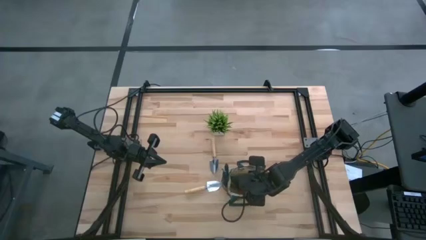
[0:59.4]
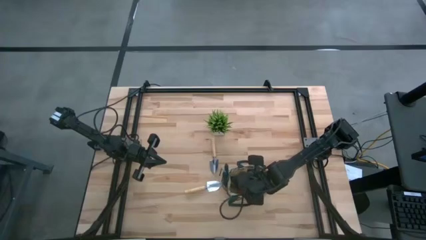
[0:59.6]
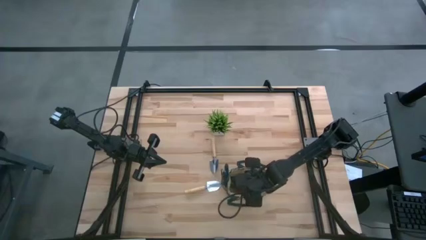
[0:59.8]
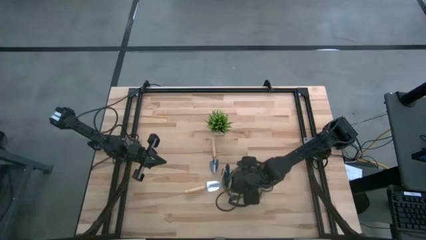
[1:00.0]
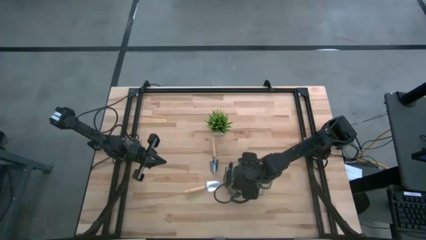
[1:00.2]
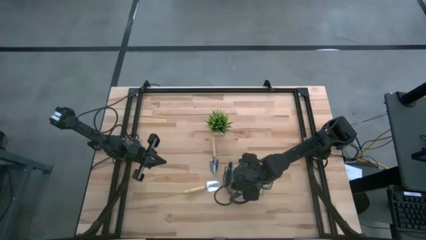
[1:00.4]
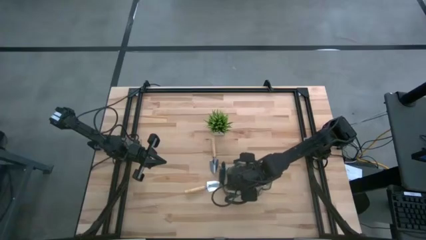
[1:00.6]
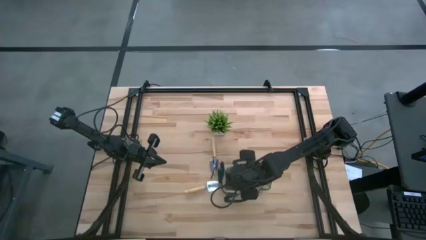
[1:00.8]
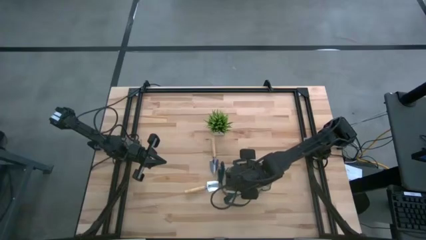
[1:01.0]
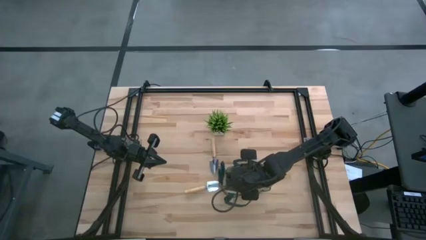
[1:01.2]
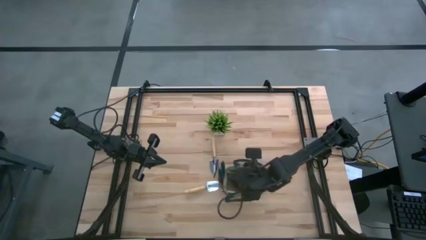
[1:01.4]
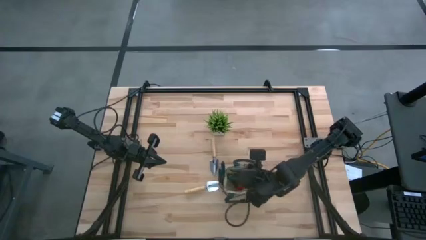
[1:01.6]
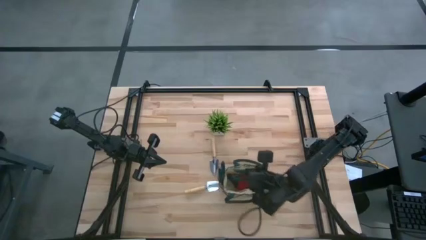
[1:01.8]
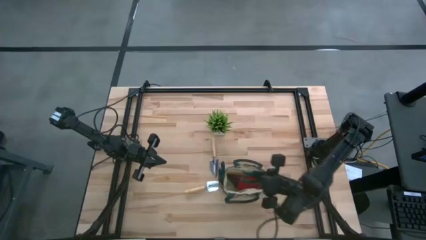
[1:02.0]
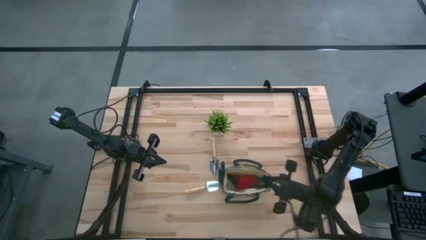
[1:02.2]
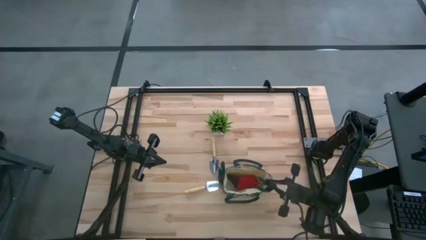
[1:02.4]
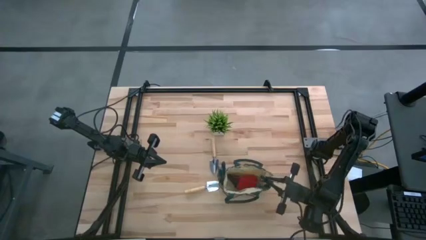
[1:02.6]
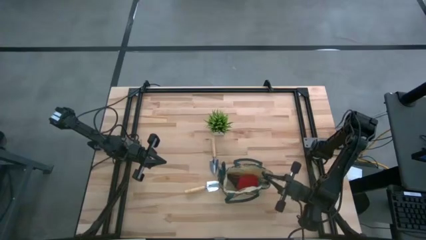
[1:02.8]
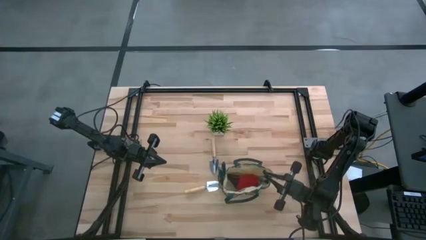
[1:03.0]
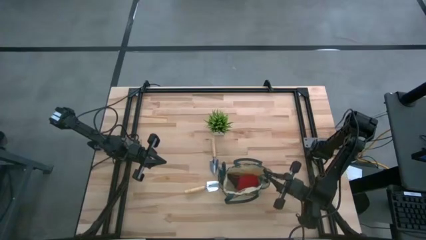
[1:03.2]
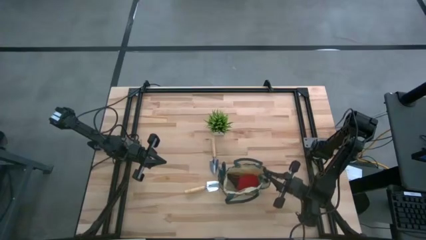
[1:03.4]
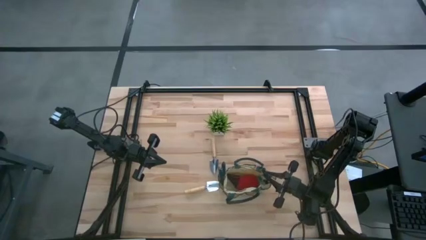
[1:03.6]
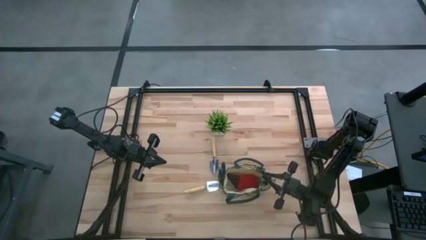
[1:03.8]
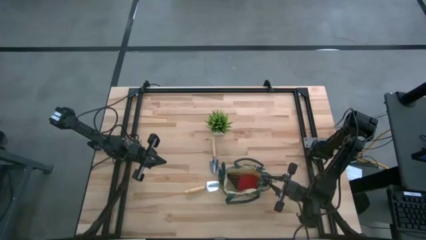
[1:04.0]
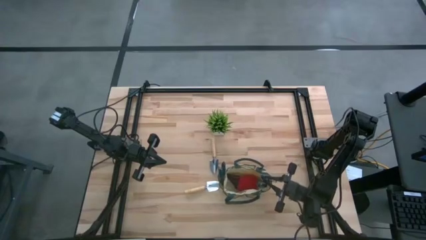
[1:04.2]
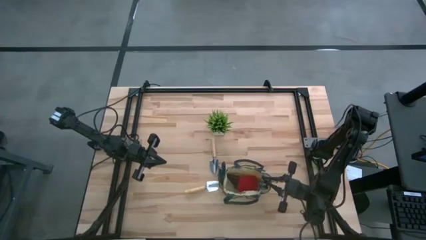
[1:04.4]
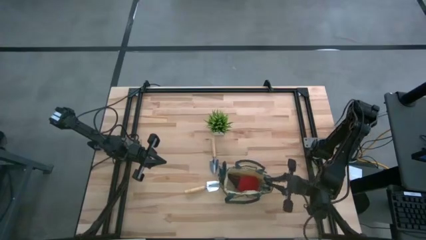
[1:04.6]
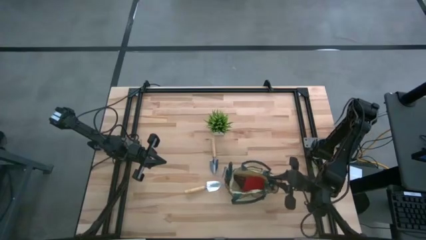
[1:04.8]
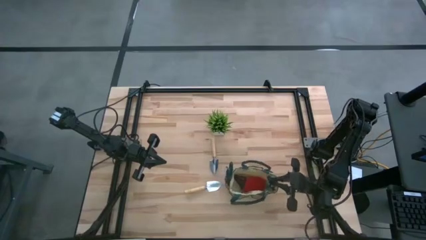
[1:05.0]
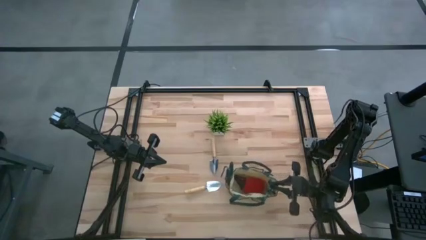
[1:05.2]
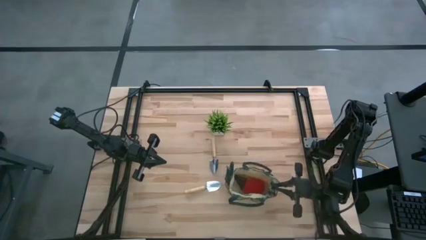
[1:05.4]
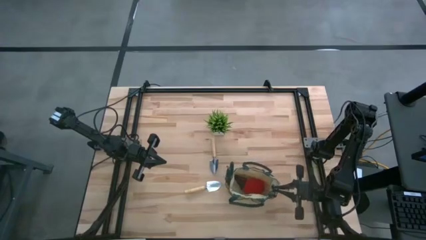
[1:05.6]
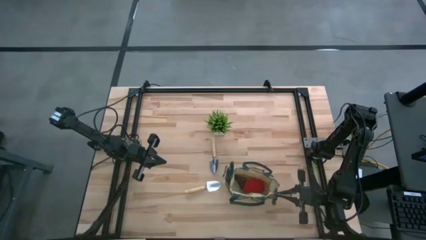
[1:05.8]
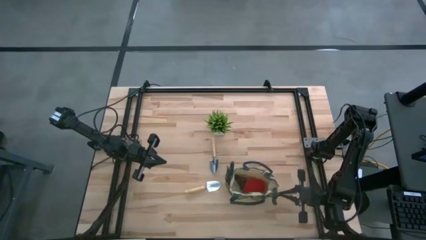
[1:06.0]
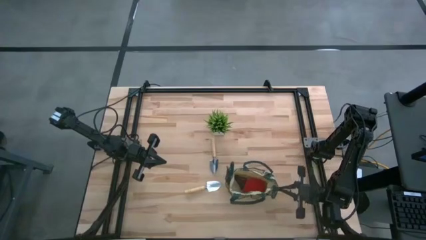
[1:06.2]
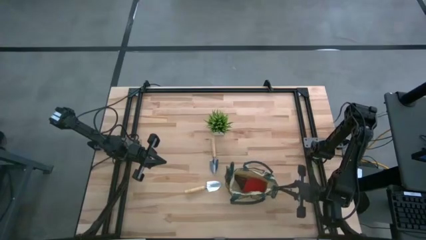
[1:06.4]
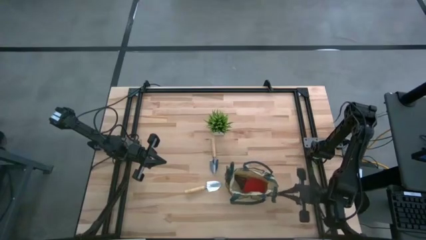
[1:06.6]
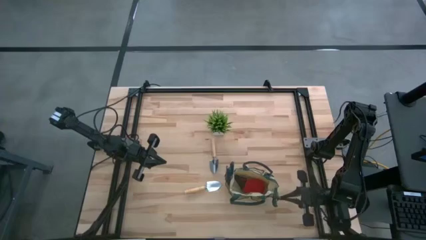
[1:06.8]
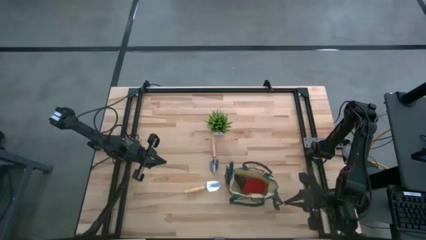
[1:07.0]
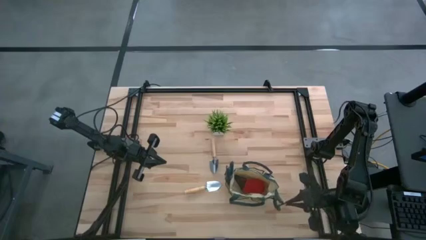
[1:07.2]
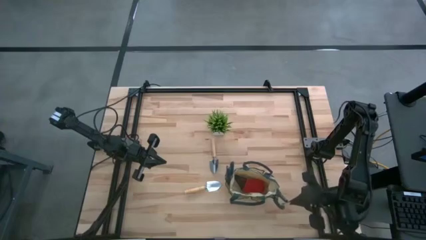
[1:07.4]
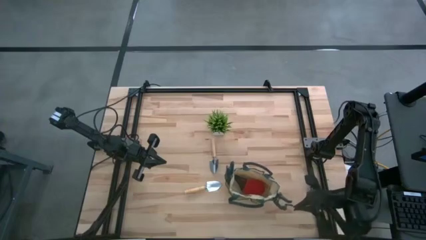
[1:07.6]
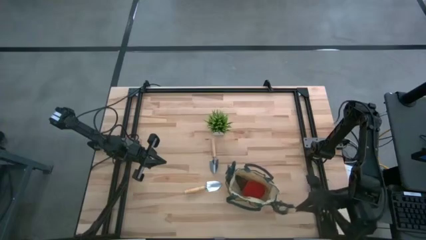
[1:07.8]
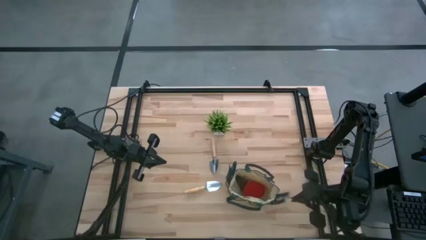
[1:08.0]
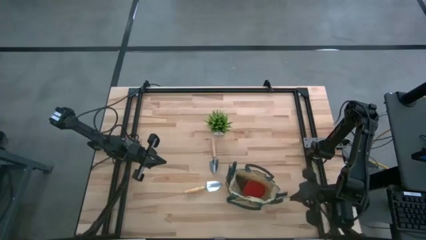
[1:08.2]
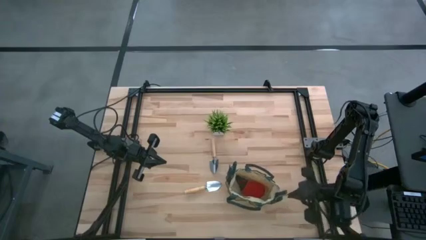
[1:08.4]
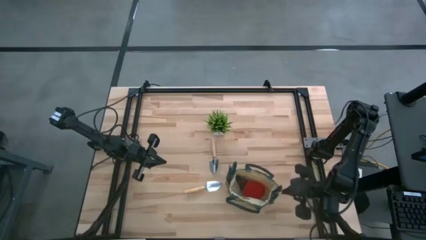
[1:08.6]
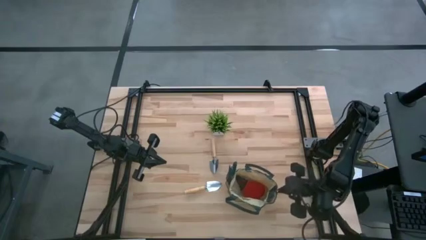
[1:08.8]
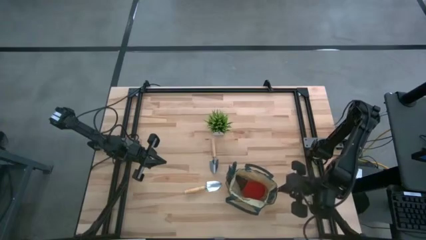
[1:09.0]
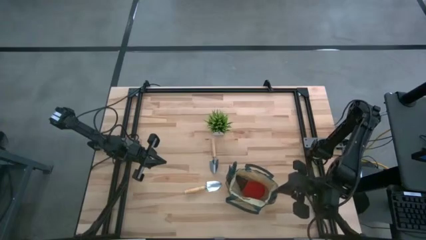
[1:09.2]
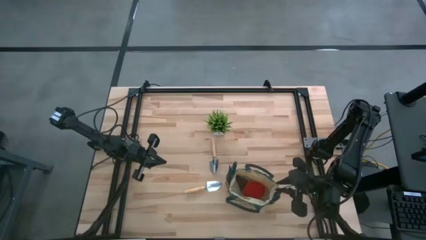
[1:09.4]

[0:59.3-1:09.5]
Task: Pick & Place Garden tools in Gardening bag
Put the green shear scissors into the green gardening bag

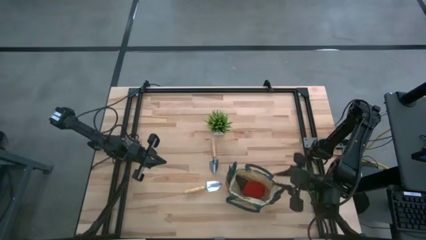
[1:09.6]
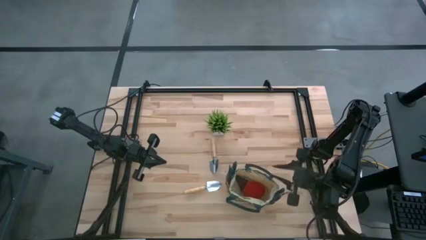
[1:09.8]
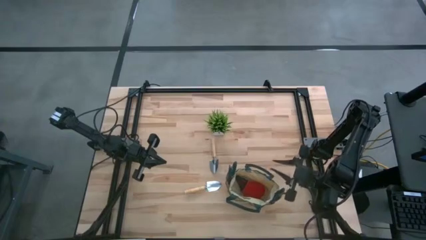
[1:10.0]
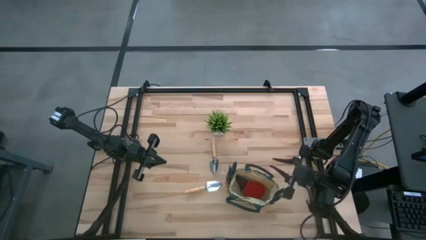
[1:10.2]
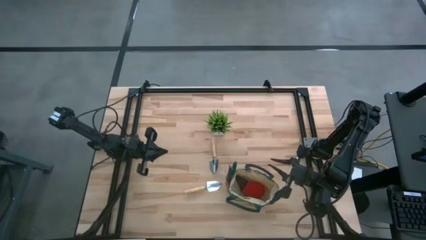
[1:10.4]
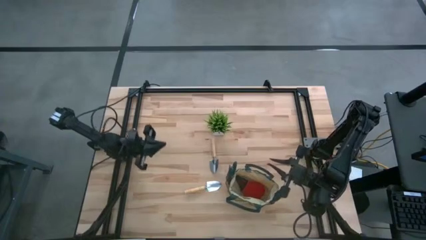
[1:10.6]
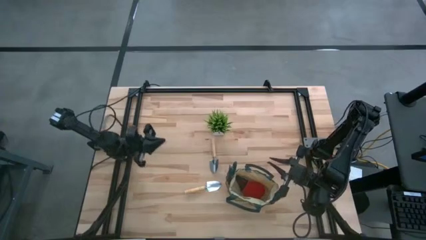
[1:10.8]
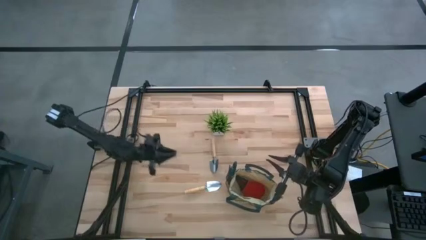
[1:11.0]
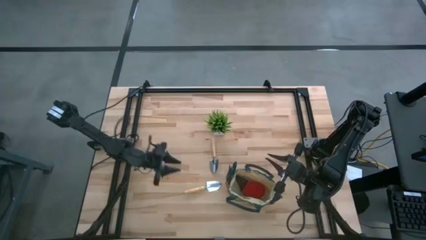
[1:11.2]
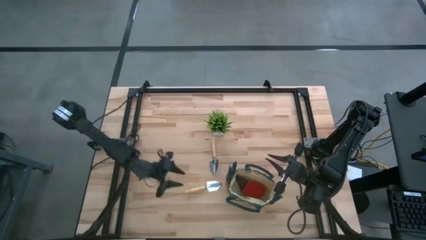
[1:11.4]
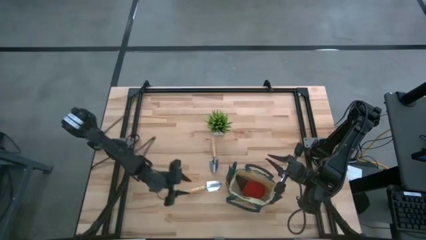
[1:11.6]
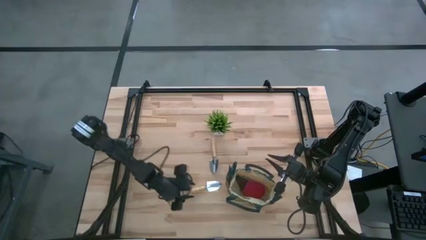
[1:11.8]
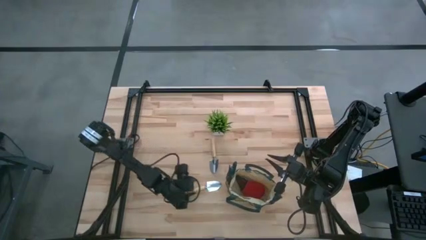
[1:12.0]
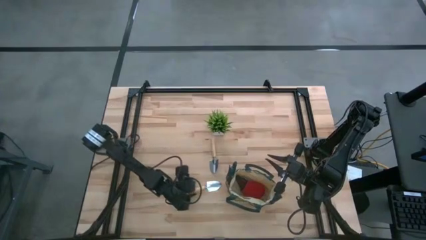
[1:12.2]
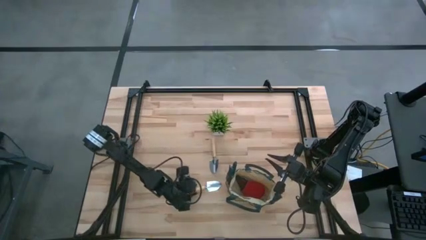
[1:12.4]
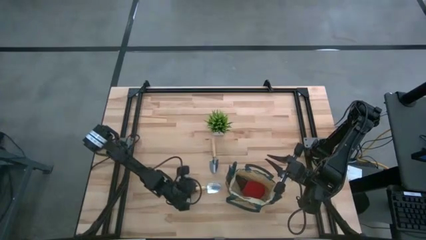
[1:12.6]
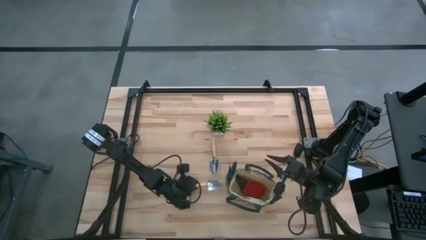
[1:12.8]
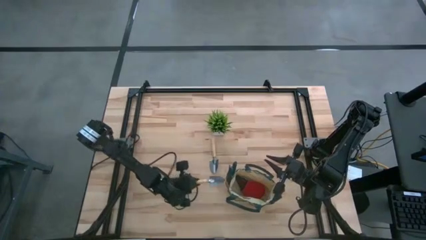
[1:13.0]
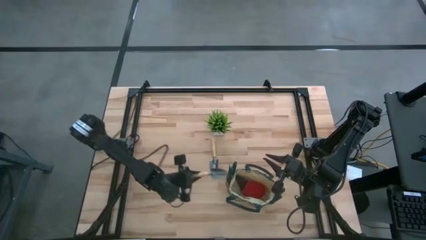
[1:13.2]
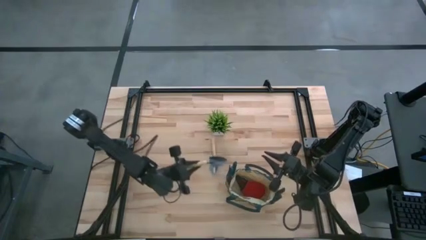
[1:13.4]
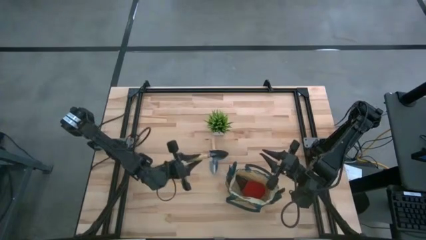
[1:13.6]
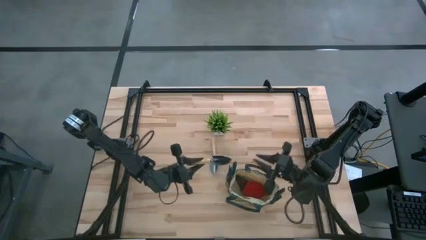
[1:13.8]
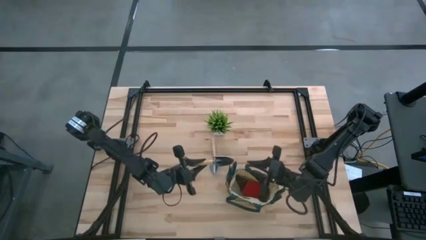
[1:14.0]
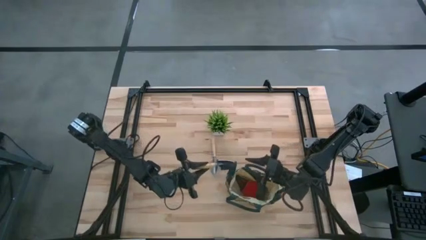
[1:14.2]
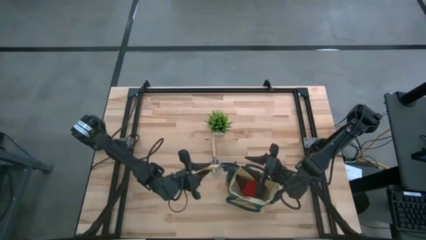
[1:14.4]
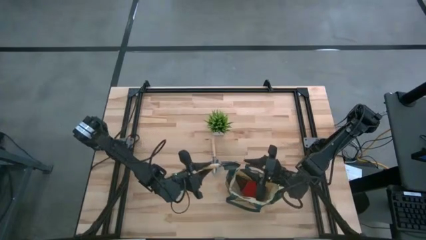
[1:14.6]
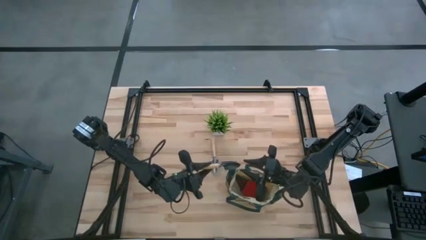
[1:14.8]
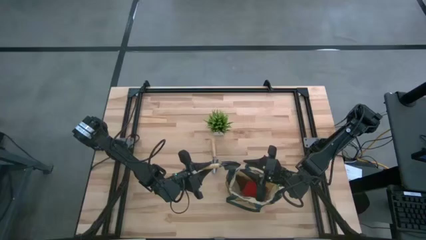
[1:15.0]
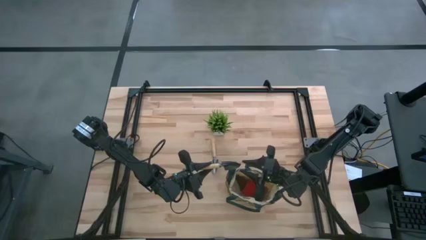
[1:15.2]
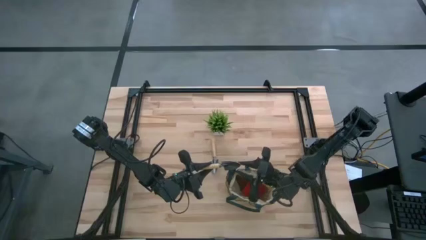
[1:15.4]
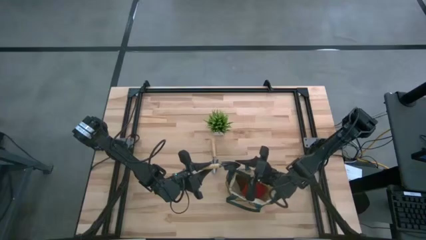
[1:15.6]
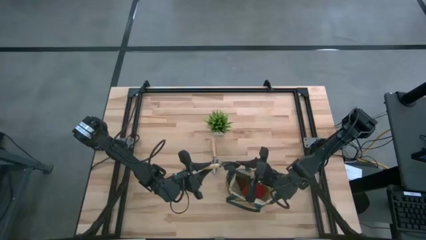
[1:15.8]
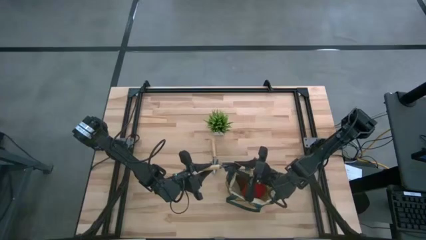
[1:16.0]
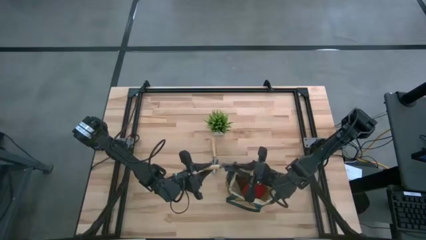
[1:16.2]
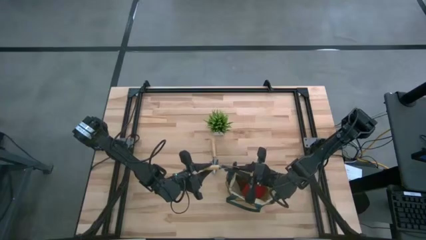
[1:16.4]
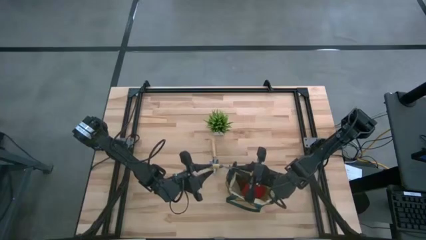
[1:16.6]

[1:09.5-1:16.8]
Put the brown trowel into the green gardening bag
